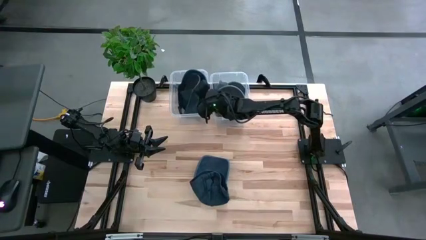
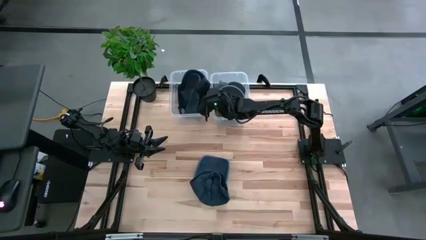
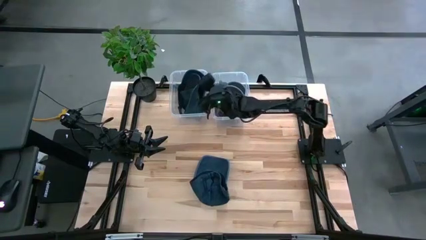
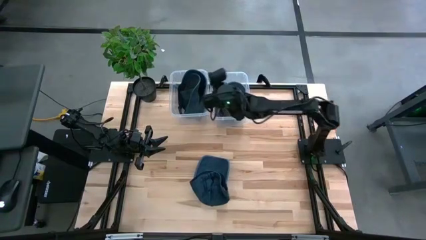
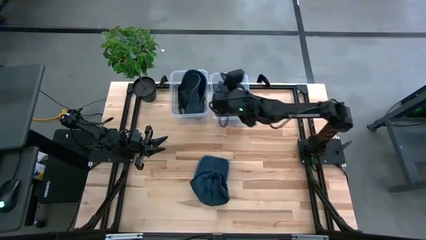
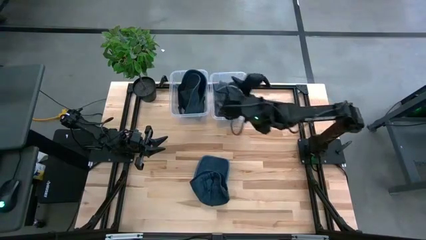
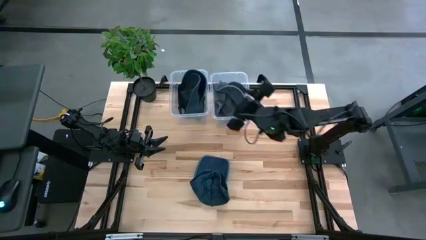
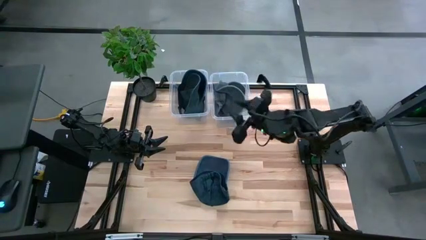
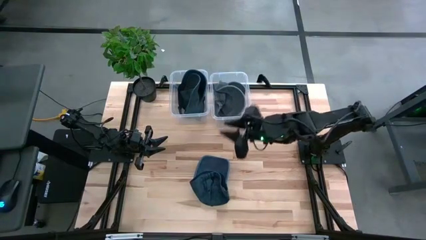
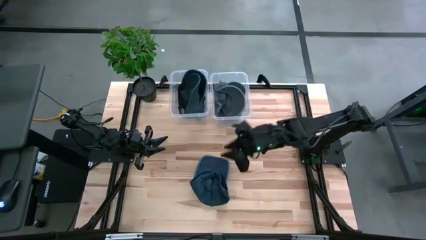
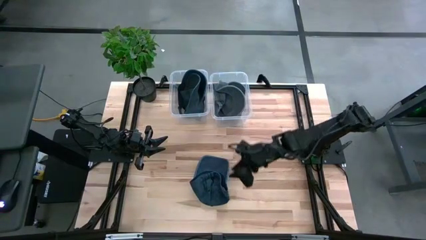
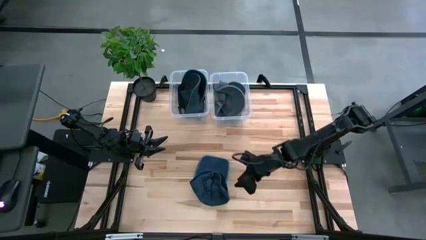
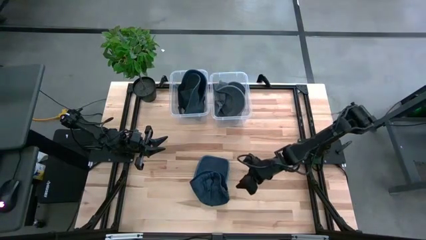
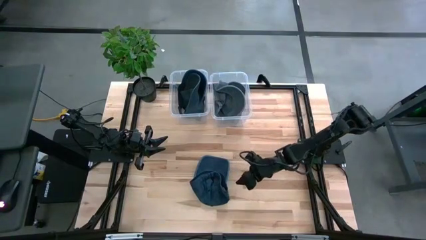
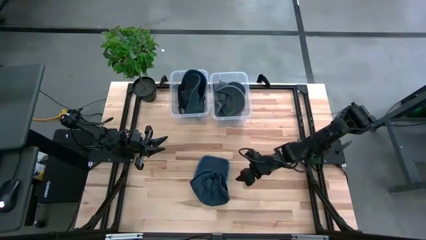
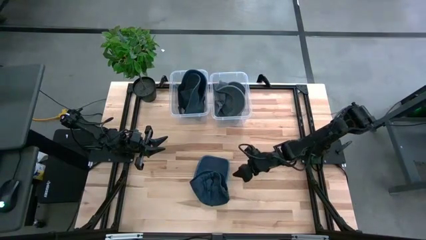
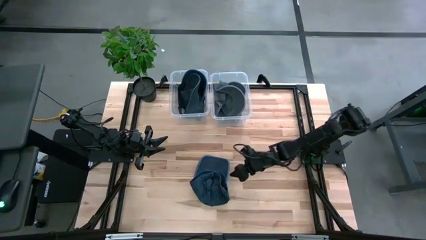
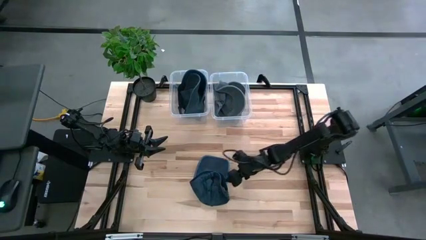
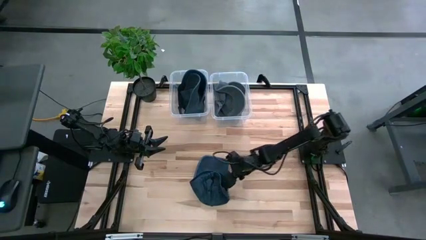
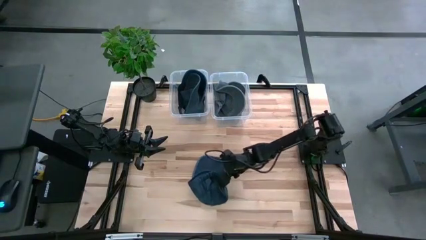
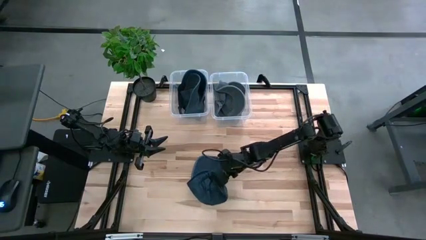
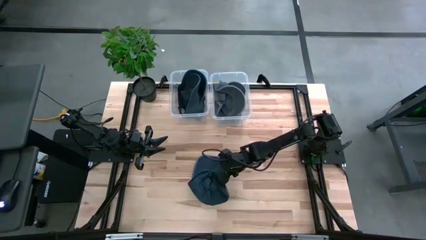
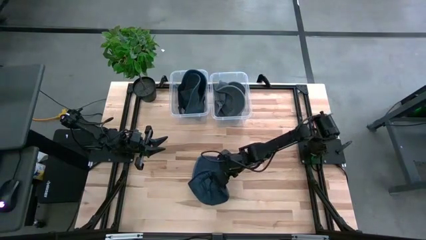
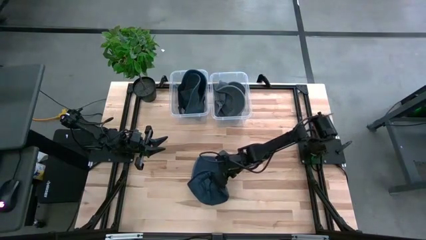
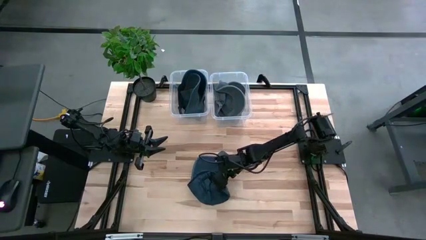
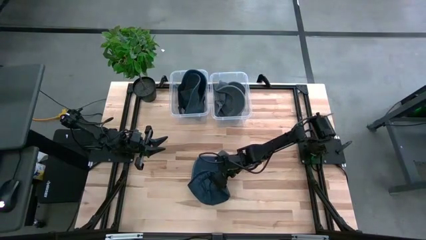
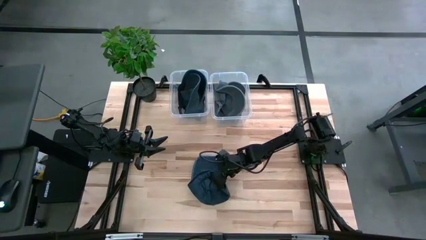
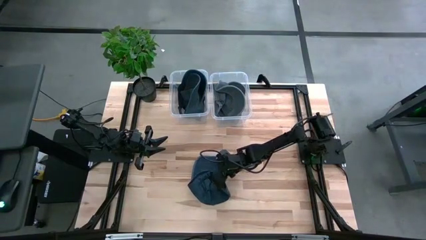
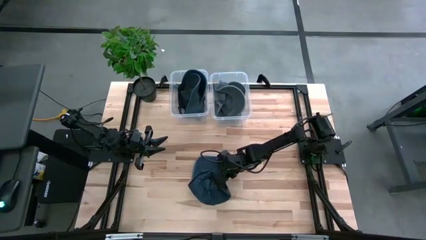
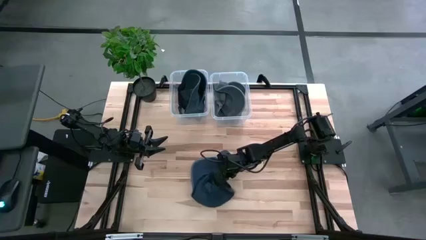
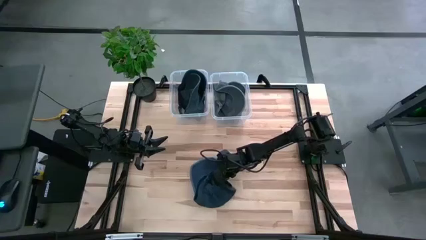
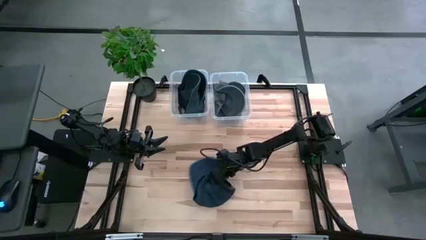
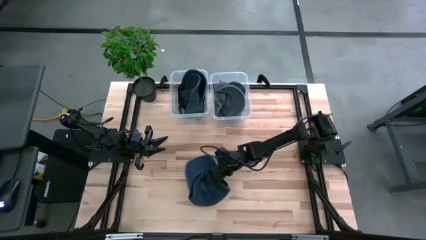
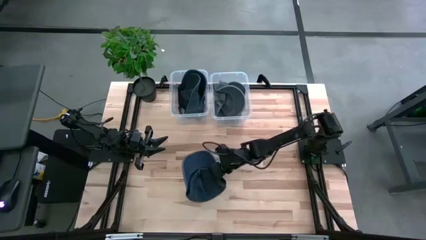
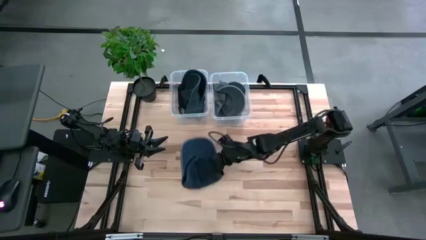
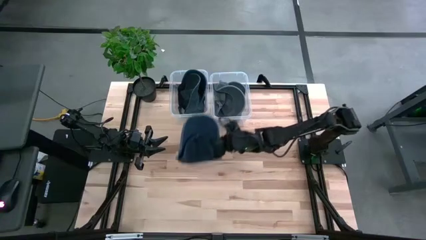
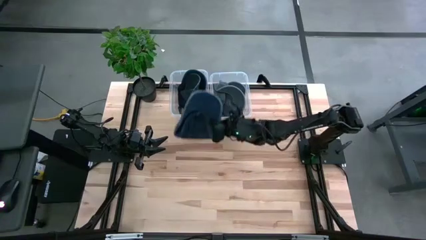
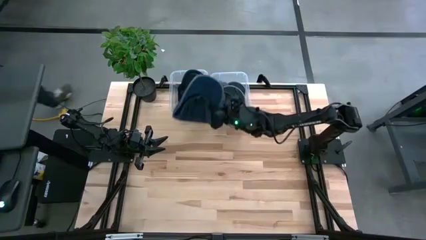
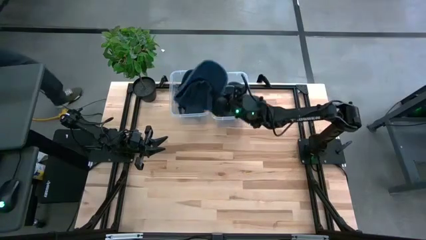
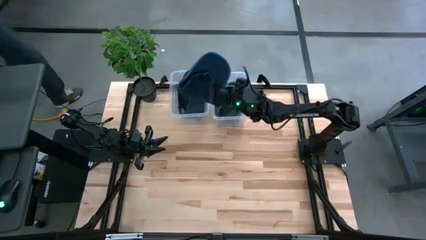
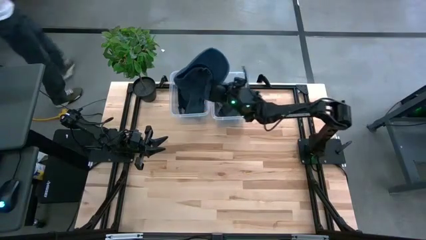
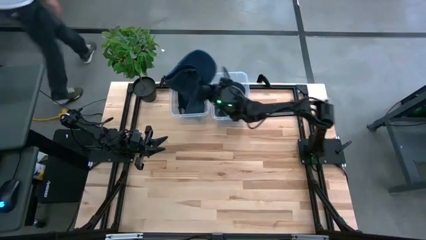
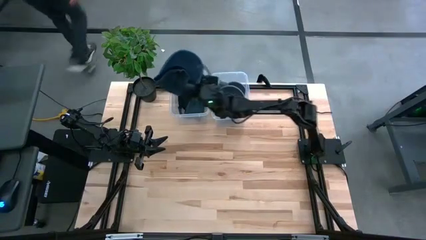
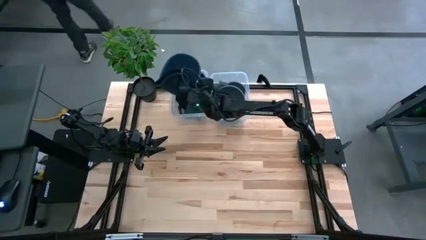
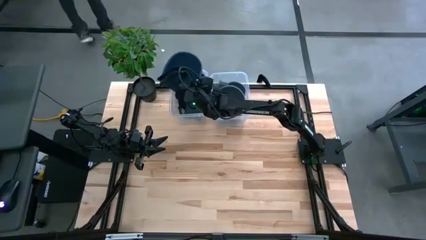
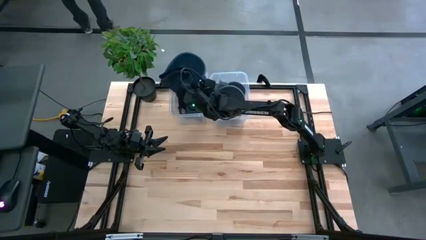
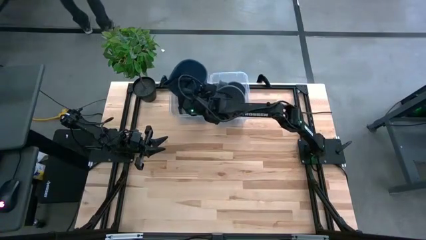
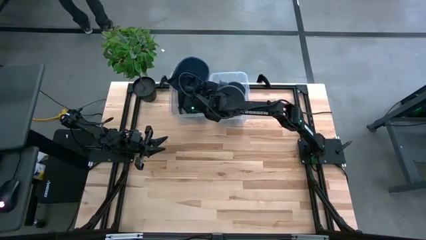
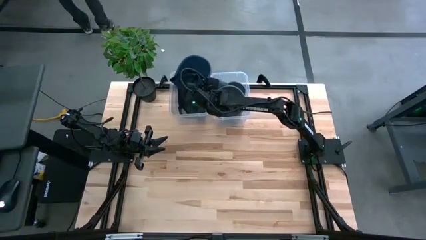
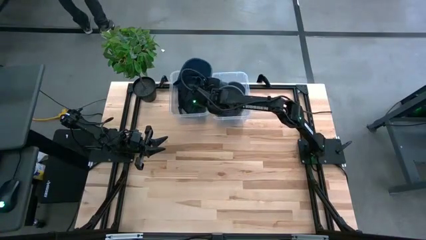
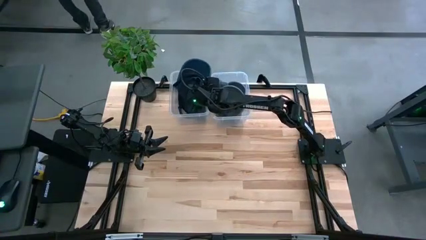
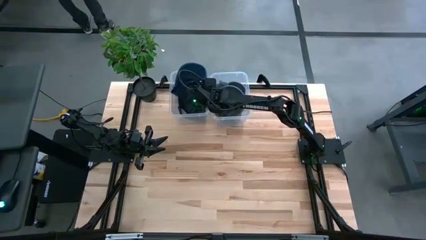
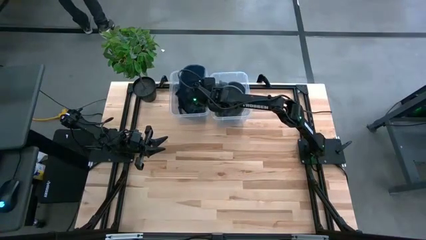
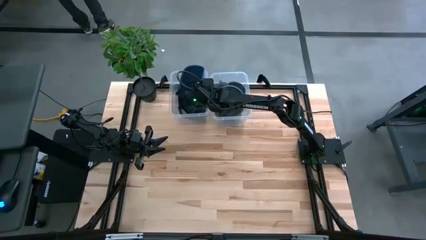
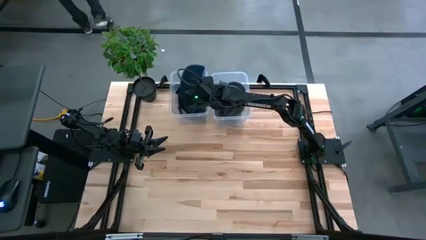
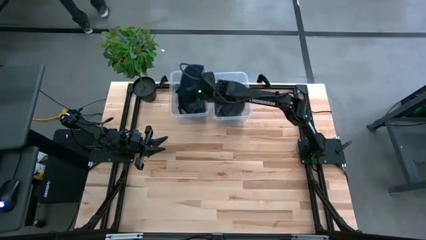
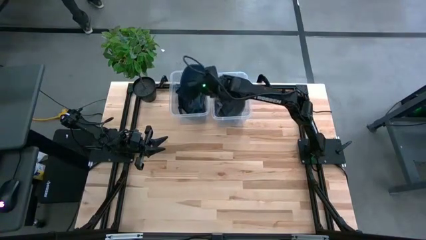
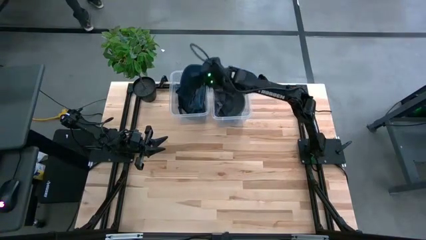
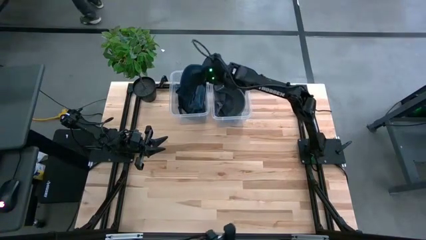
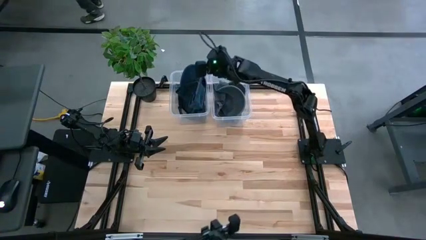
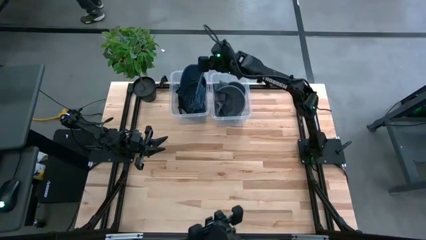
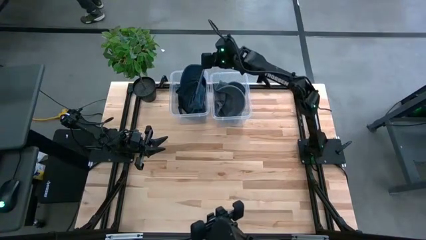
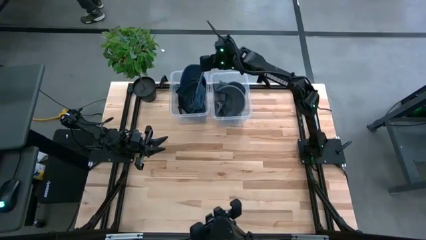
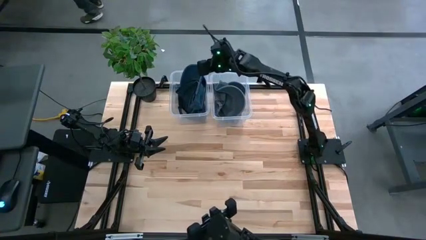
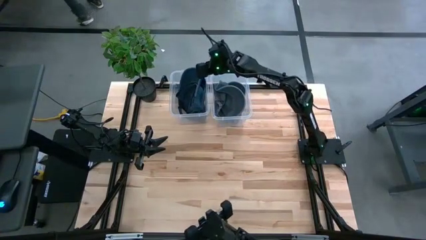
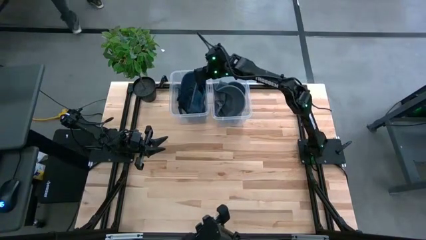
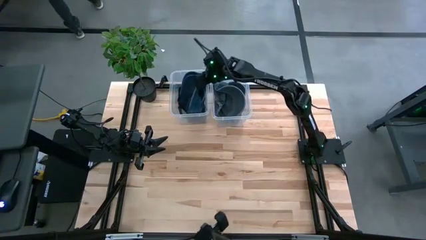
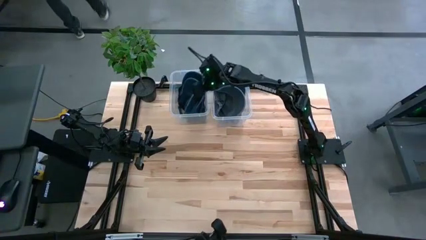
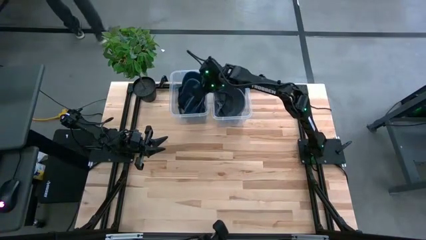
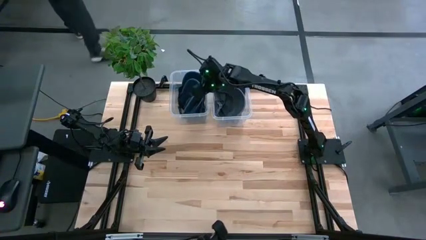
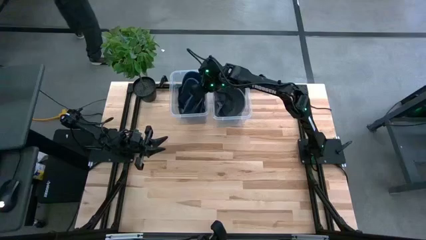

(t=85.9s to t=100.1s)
Task: Pick & Place hat
Put the blue cap into the left transparent bin

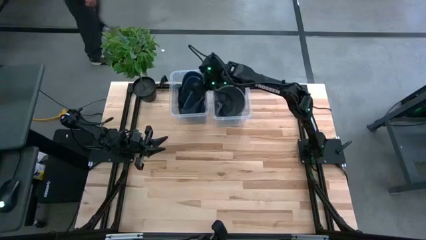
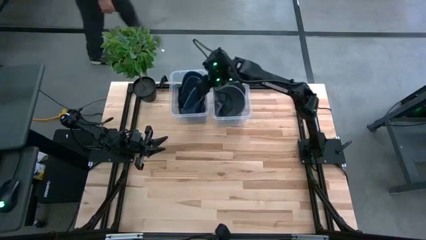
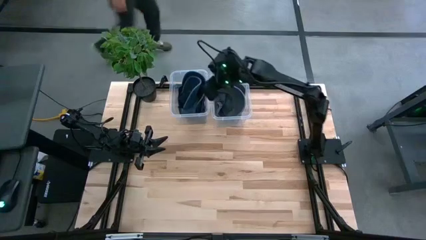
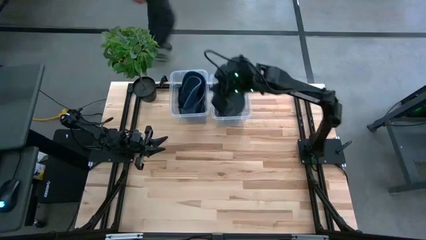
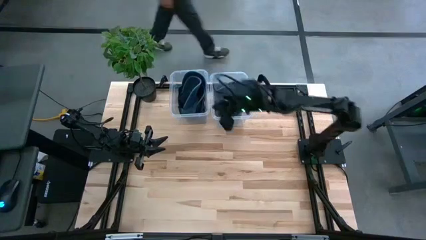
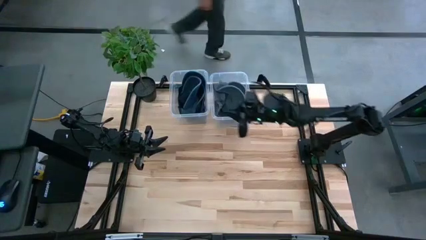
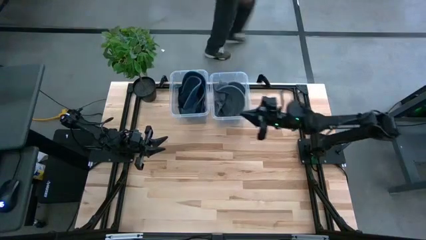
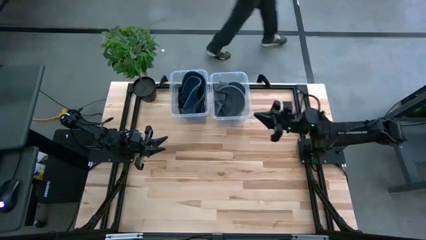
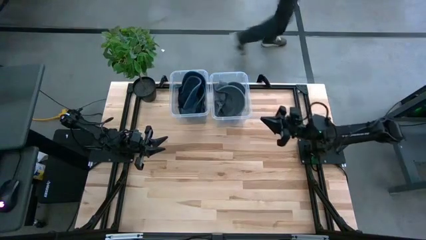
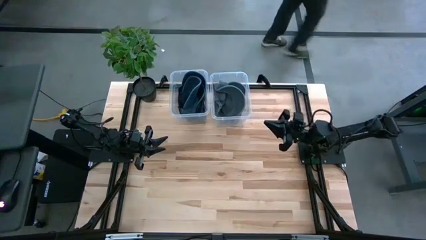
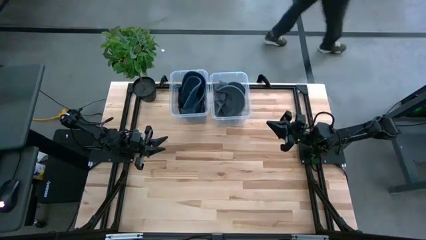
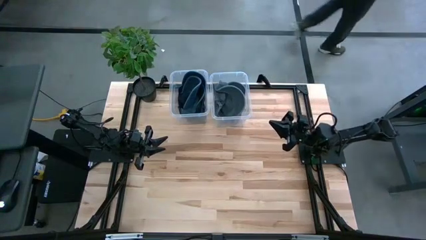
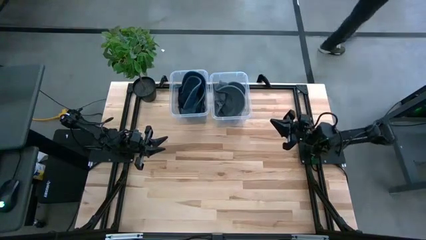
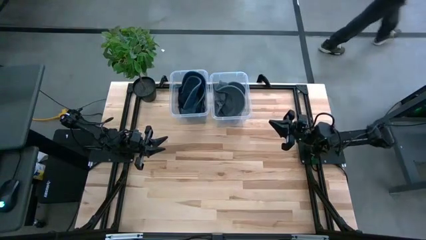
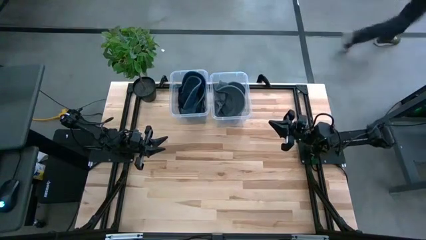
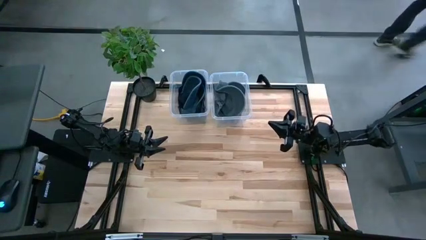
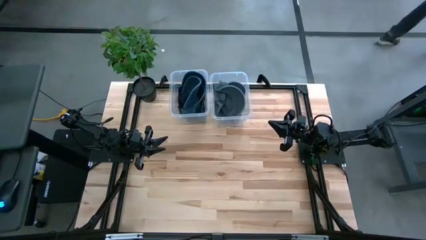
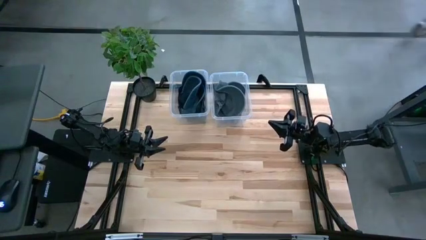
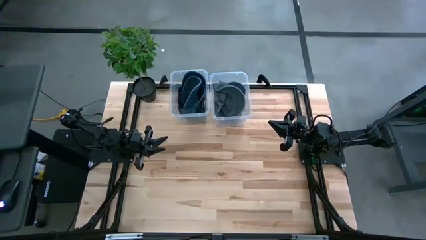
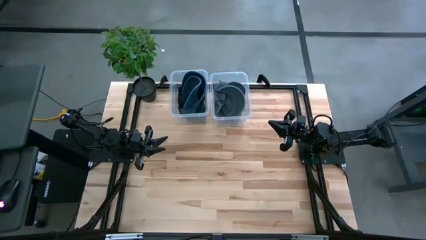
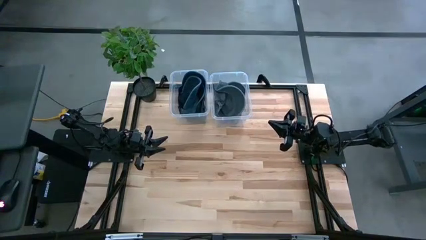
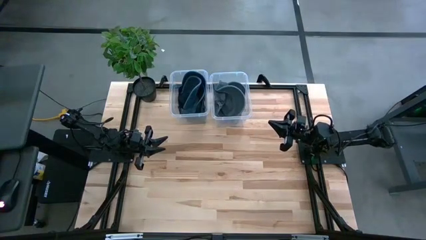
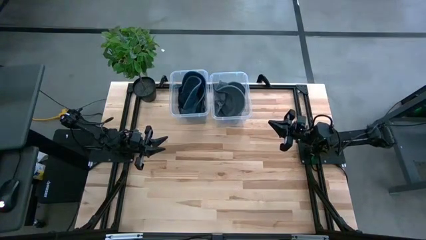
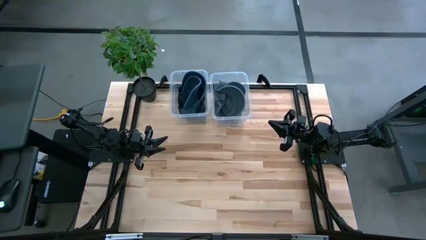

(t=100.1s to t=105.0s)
Return to Home Position
